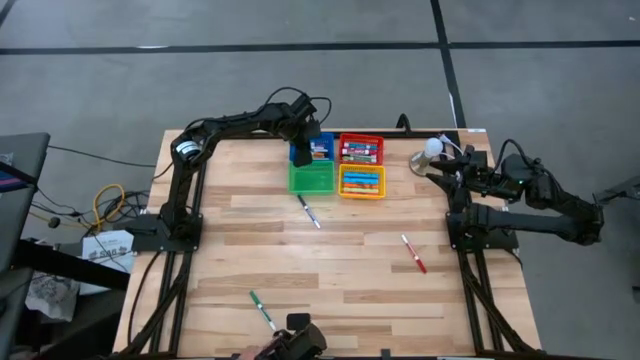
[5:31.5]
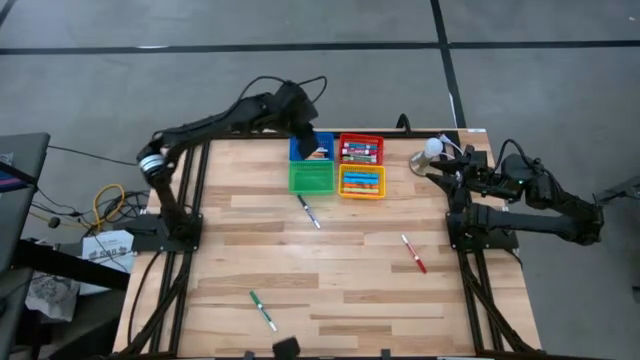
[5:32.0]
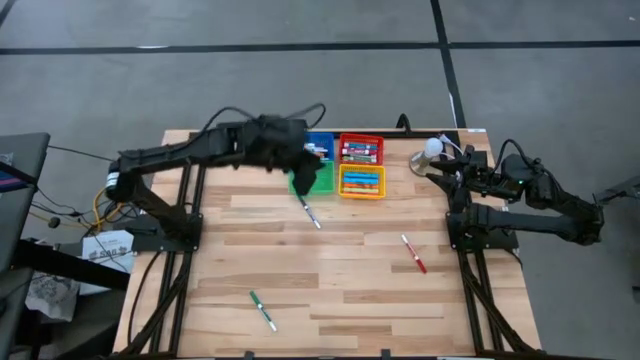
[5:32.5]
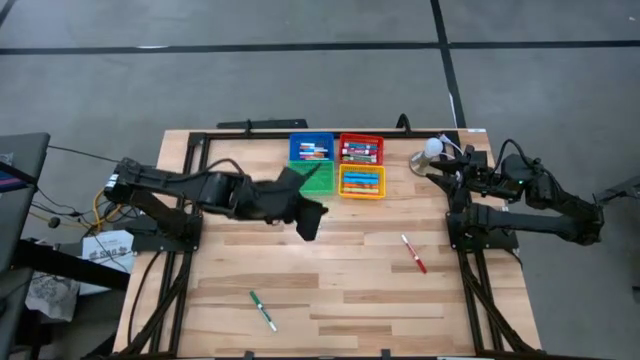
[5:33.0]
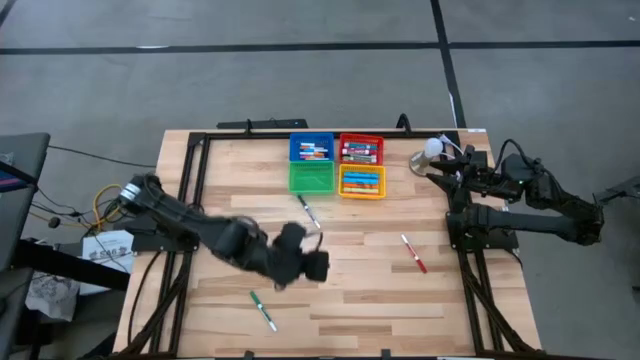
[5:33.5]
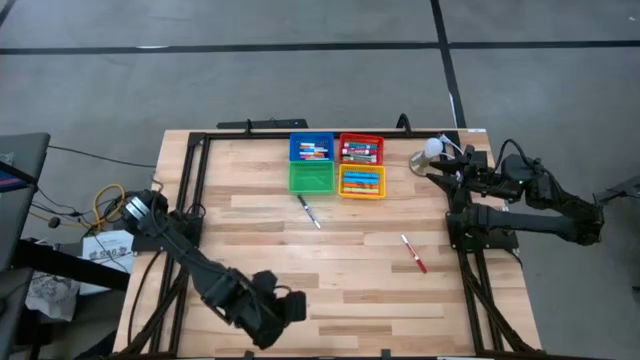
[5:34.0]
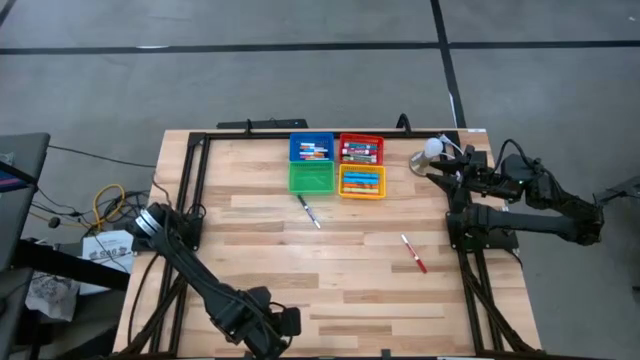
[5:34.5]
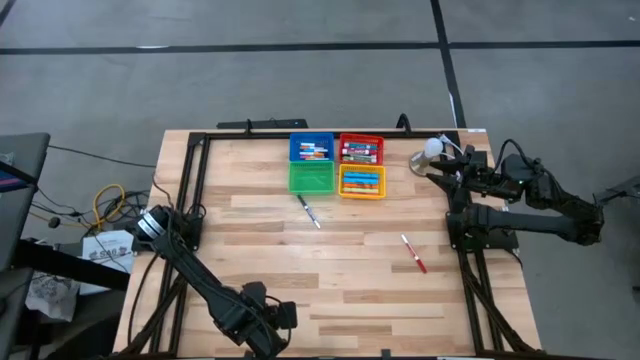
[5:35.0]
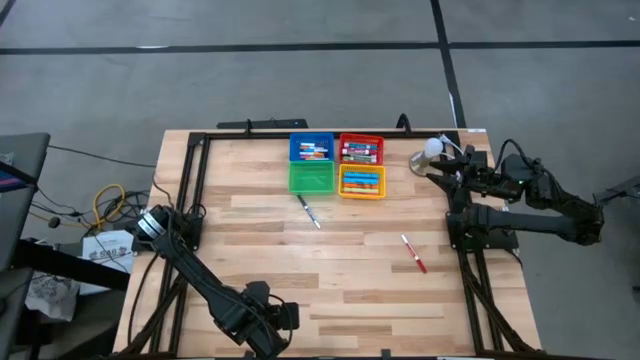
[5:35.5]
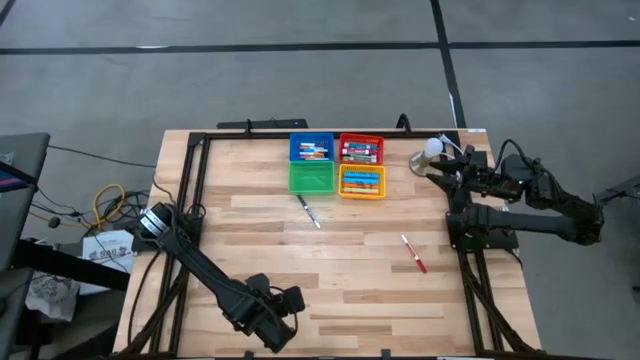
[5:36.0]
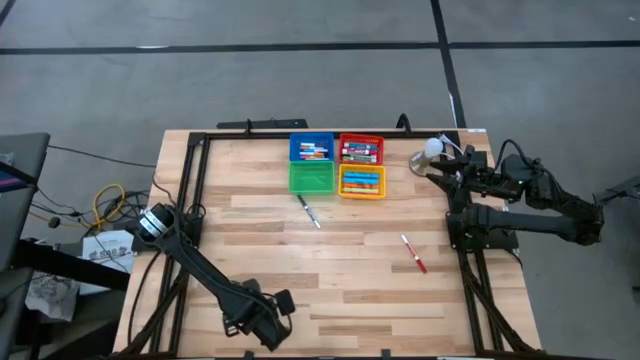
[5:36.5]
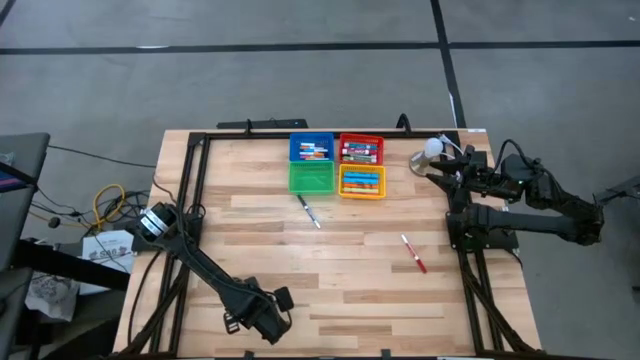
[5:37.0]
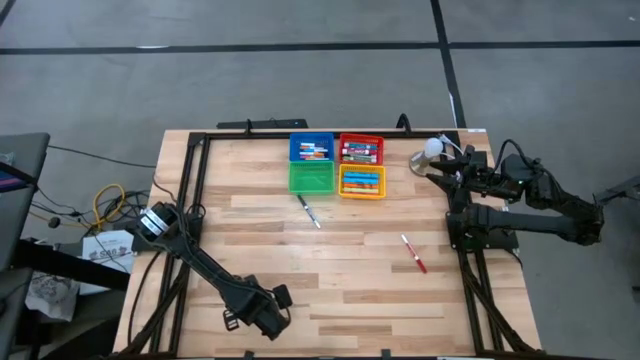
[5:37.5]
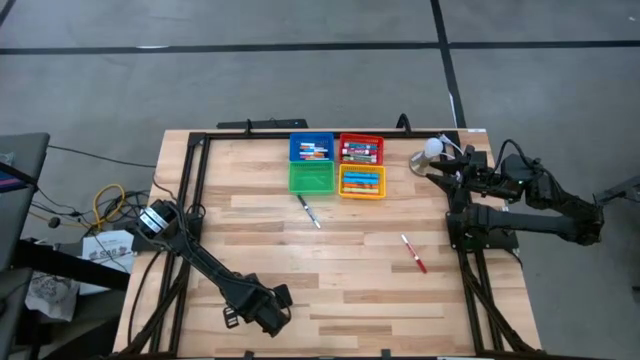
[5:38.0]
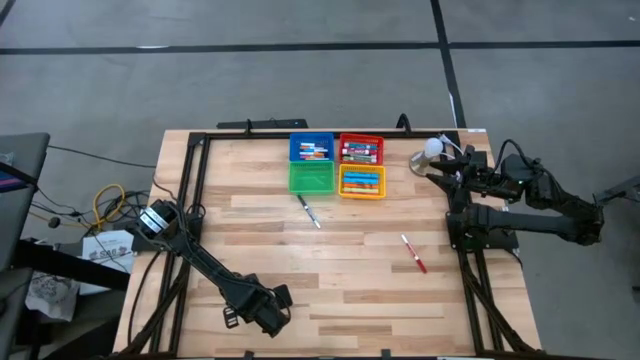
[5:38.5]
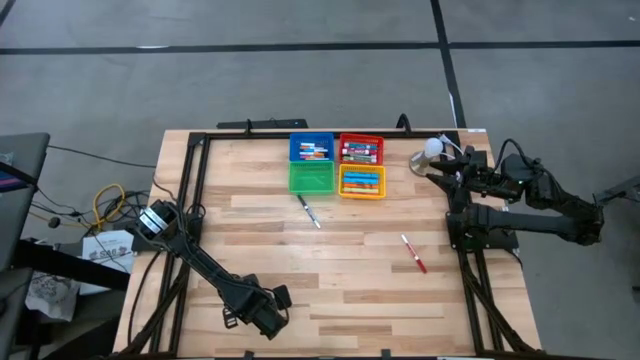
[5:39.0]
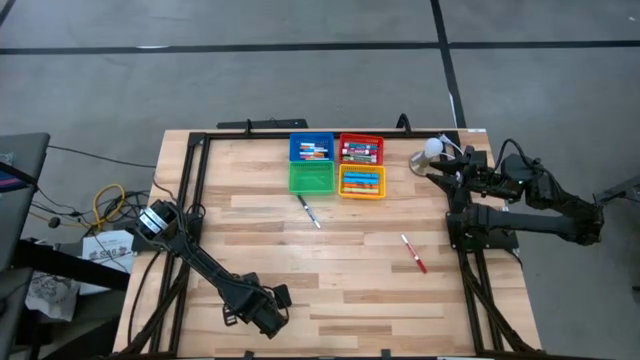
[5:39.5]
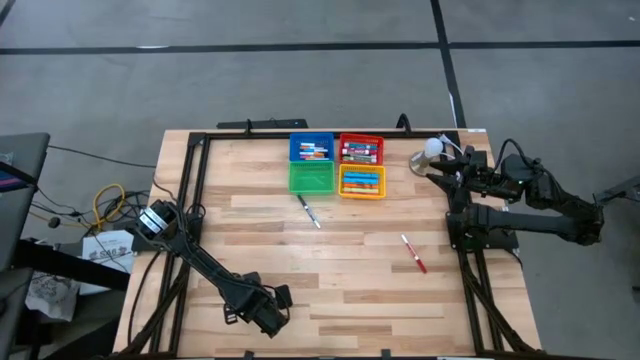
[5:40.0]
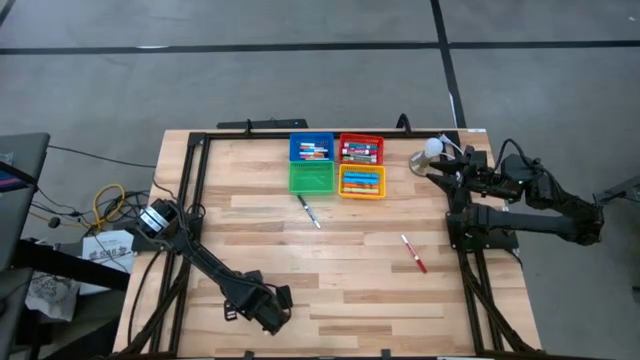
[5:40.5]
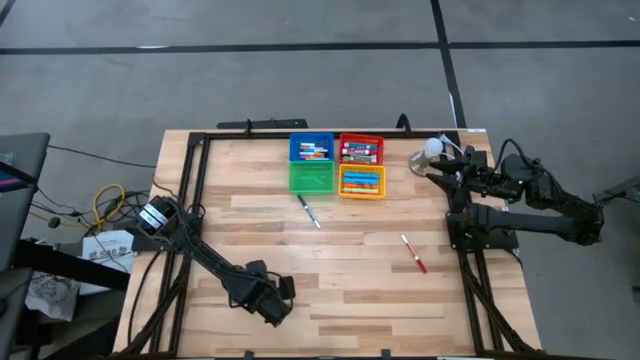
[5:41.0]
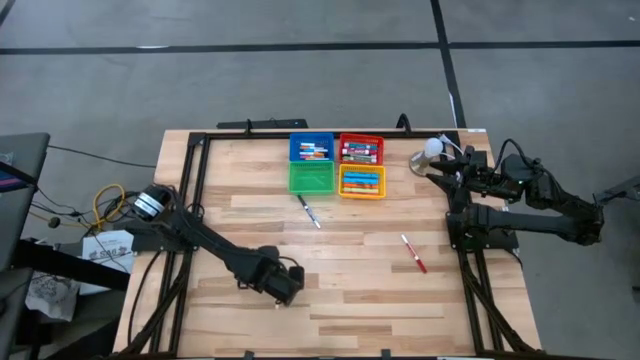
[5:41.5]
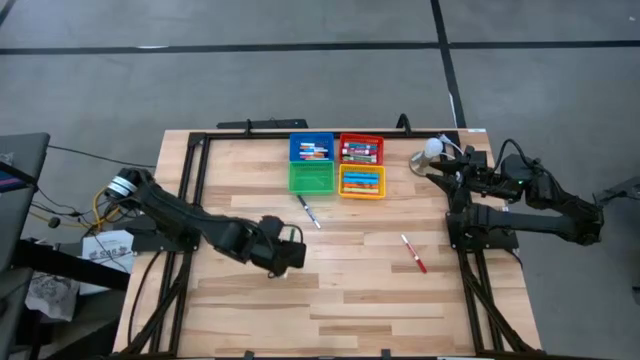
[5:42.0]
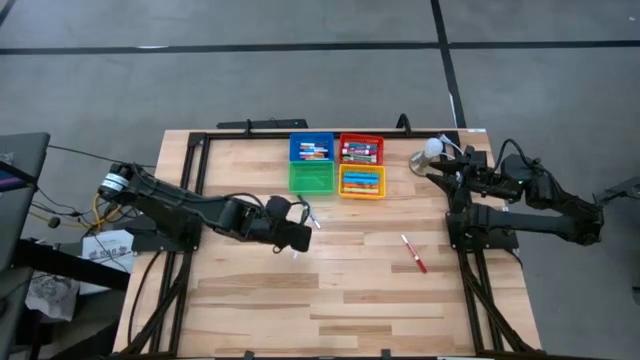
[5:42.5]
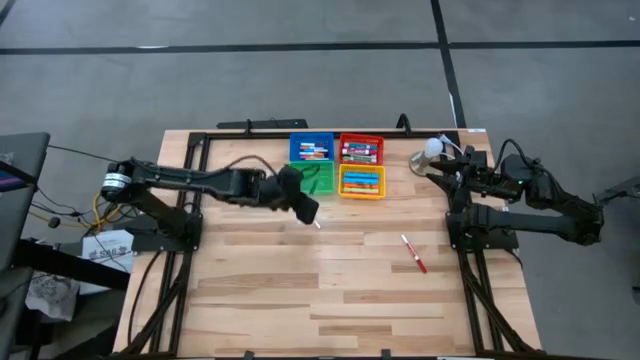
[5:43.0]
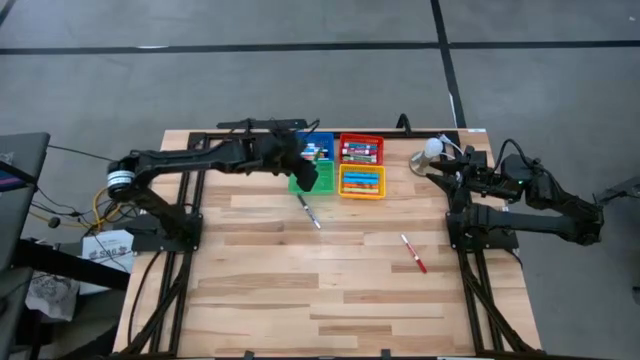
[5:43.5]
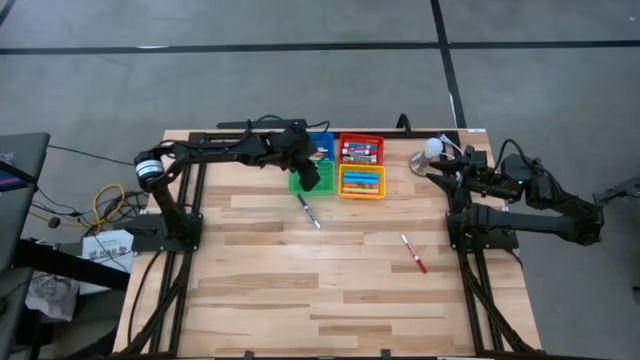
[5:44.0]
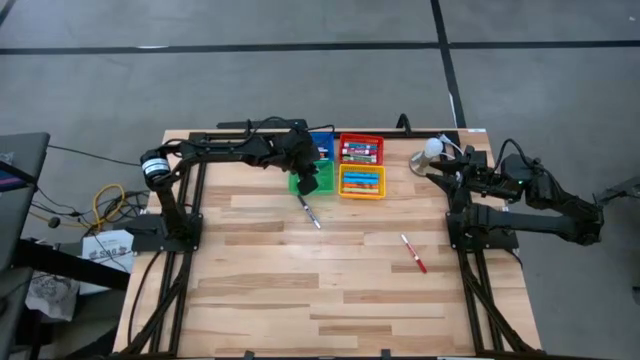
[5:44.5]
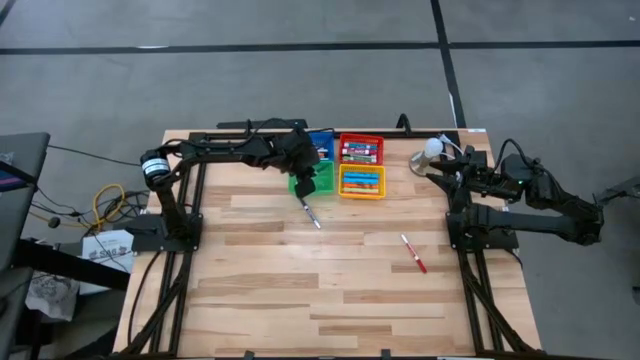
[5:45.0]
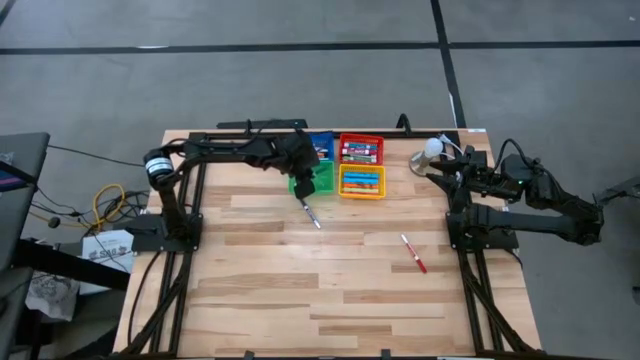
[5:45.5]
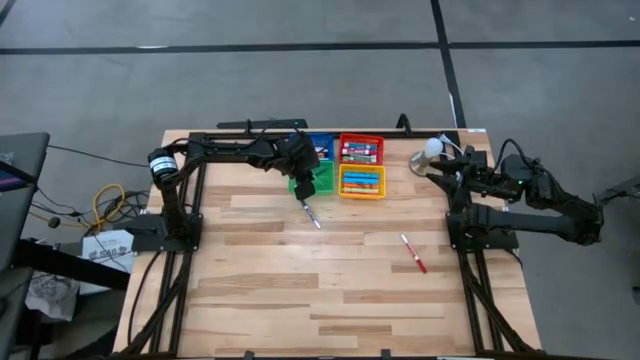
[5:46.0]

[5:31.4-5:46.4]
Task: Pick & Place Markers
Put the small green marker pen into the green bin
